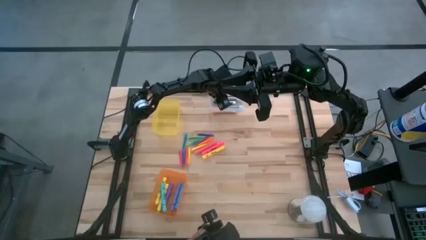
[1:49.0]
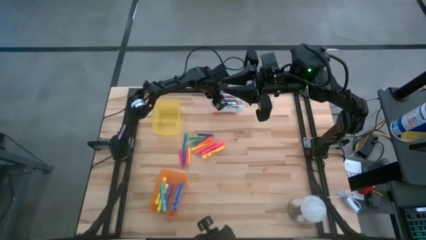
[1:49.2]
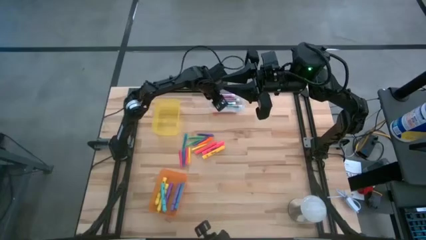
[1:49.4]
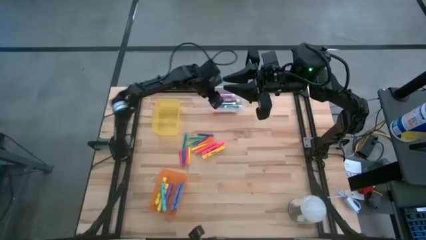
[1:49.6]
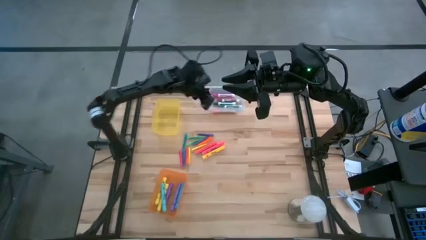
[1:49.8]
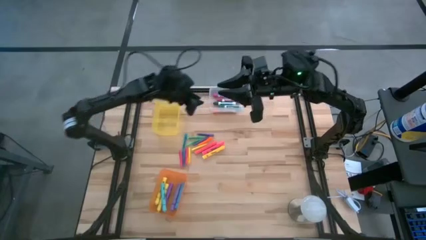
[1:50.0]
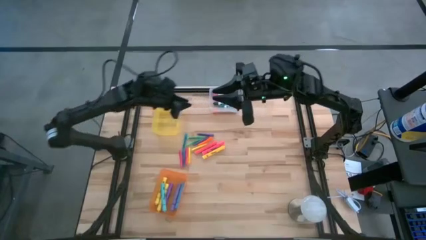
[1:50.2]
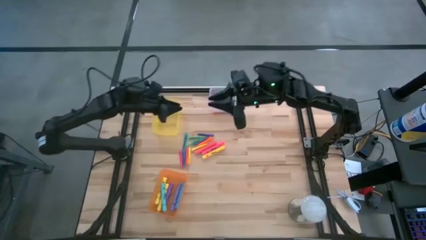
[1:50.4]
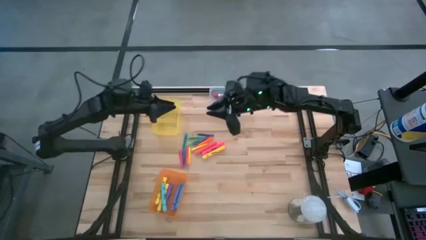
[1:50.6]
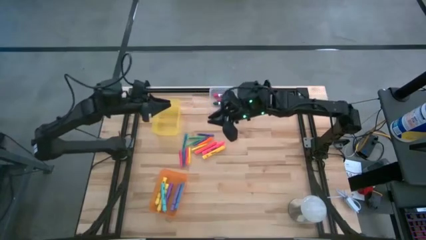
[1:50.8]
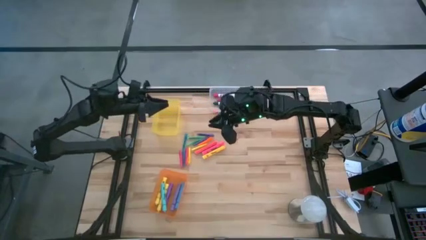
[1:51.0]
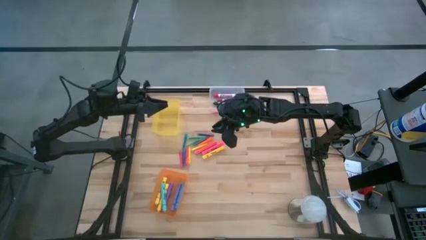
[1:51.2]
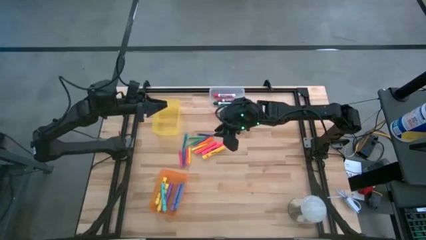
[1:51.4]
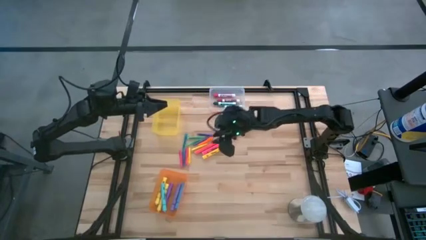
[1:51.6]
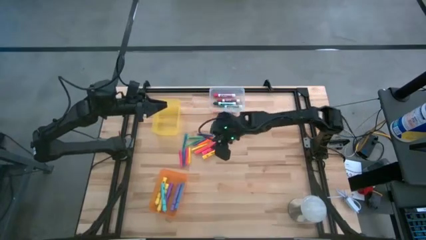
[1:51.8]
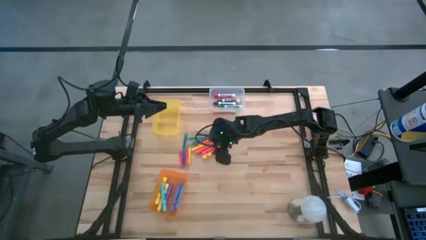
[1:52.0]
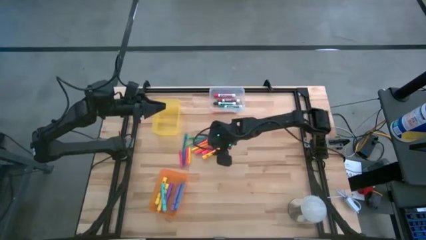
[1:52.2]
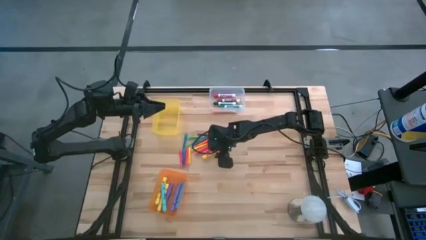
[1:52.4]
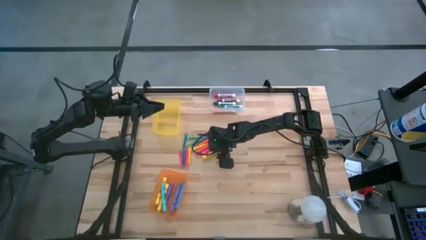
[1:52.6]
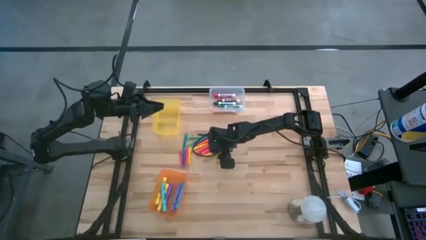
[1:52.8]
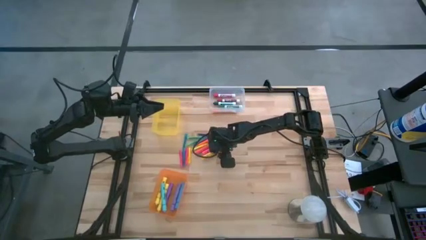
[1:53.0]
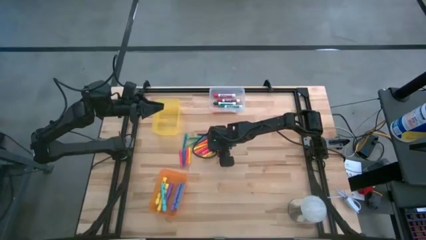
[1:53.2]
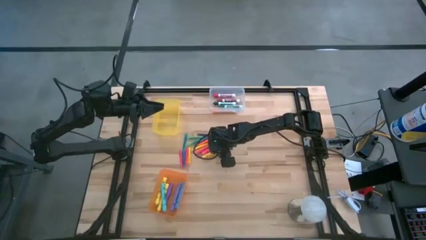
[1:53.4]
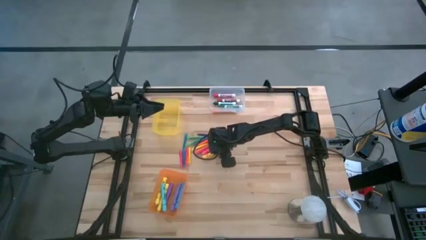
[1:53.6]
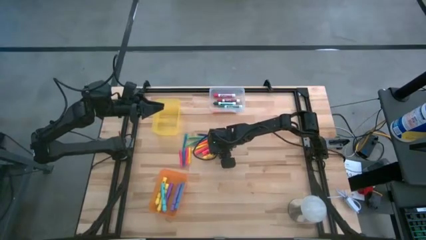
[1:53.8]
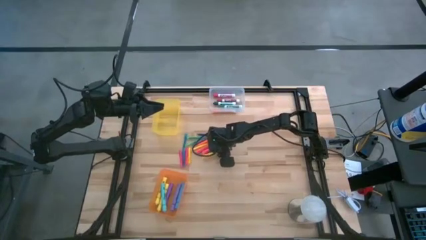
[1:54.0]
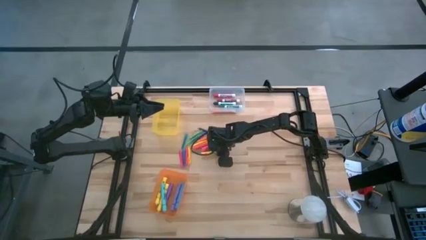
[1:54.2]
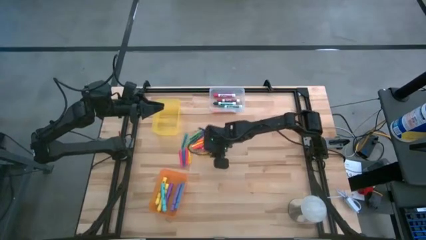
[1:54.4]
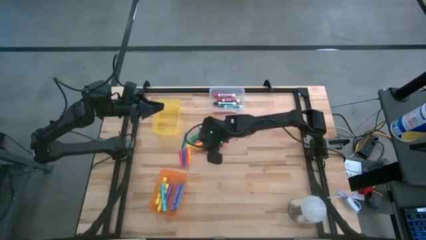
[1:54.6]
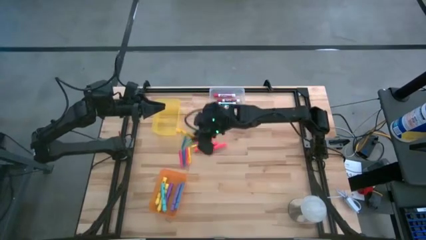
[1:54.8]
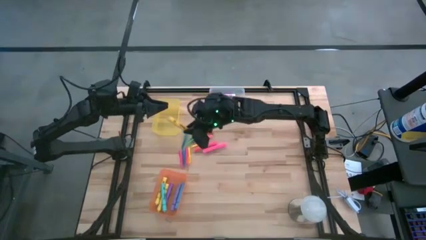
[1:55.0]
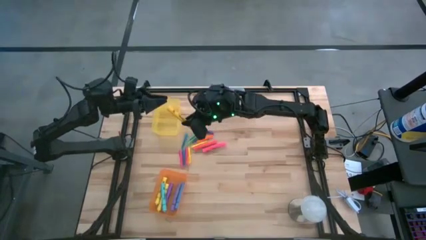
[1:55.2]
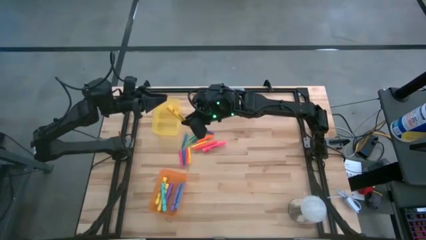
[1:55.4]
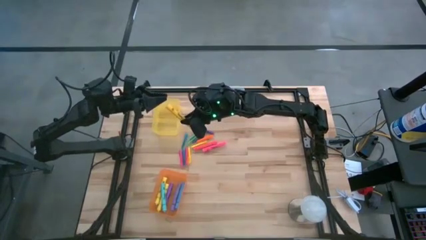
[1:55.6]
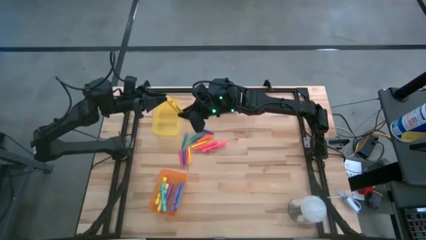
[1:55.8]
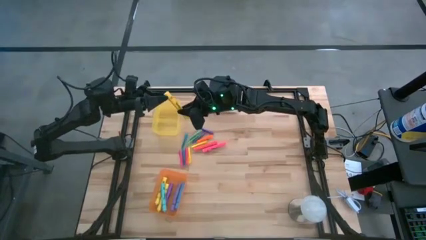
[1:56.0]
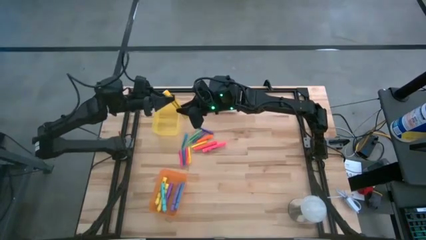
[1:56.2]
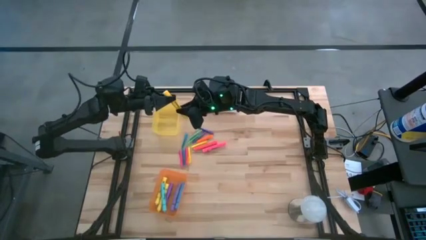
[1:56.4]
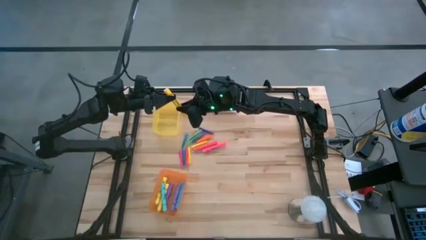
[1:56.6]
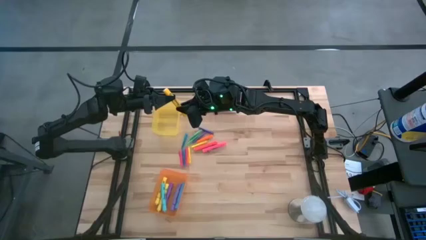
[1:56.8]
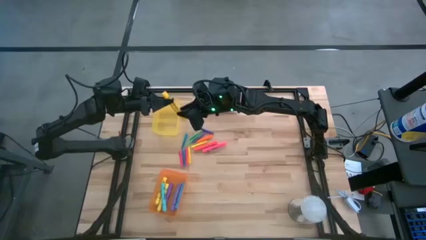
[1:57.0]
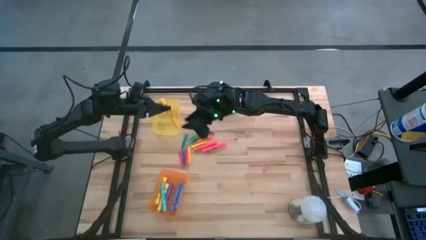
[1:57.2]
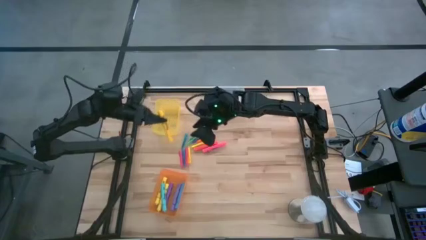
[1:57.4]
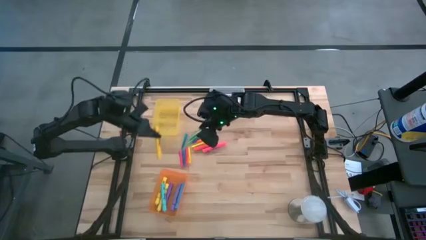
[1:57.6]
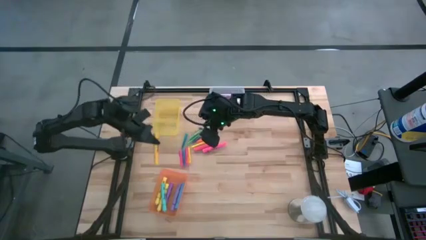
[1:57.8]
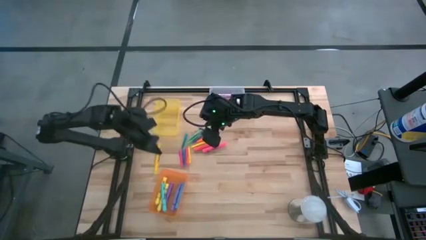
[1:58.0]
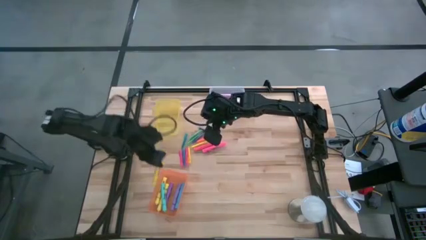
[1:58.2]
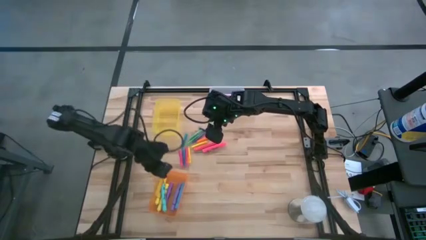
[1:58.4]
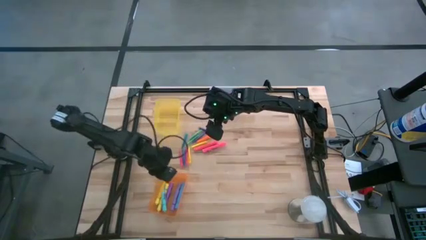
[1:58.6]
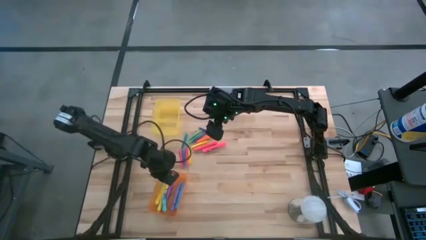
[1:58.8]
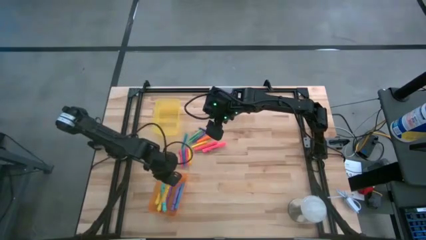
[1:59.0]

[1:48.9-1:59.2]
Task: Pick & Place Markers
Put the dark yellow highlighter into the orange bin

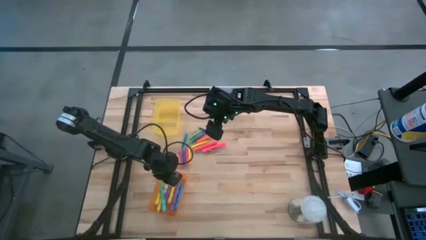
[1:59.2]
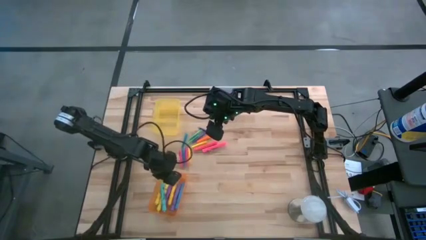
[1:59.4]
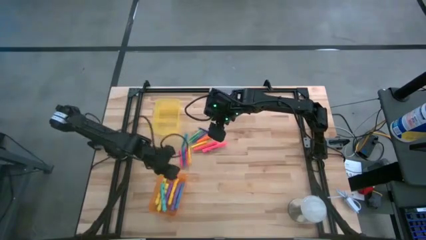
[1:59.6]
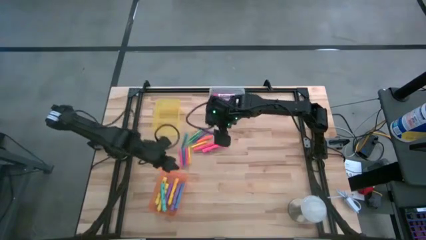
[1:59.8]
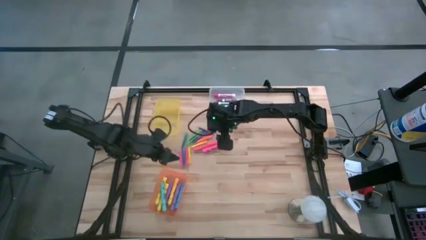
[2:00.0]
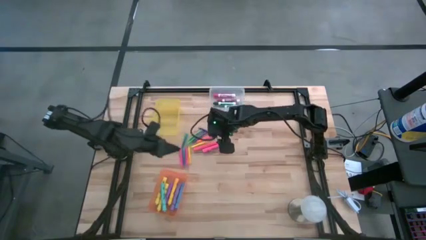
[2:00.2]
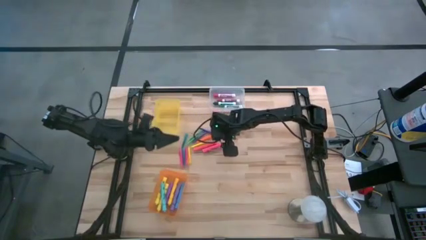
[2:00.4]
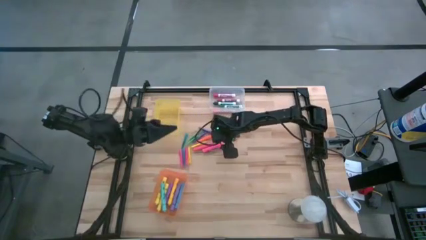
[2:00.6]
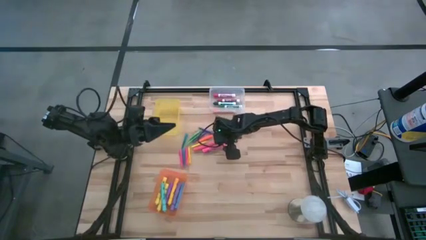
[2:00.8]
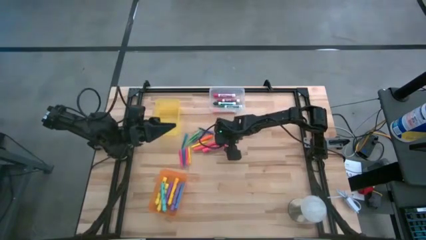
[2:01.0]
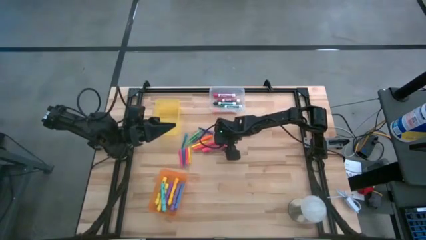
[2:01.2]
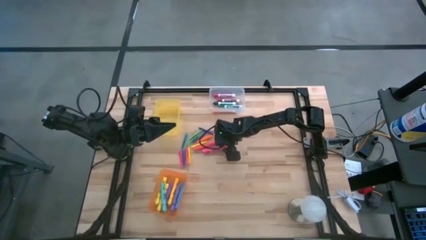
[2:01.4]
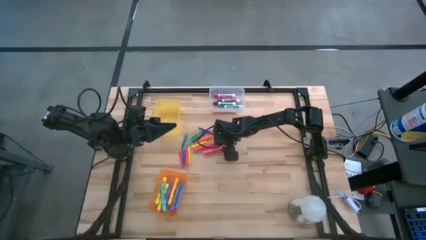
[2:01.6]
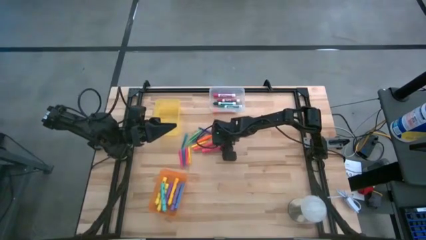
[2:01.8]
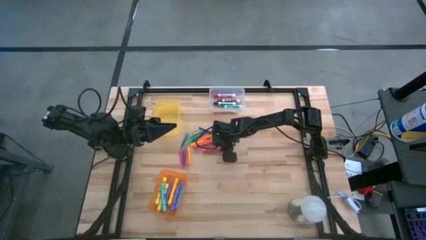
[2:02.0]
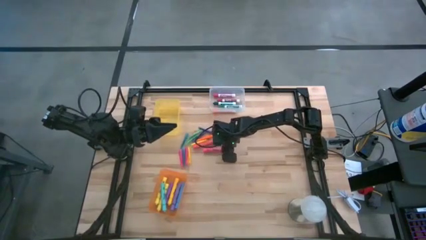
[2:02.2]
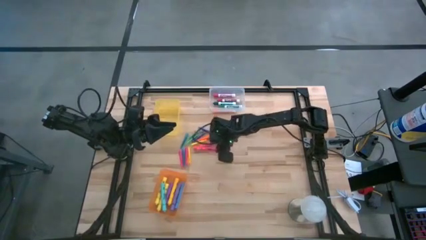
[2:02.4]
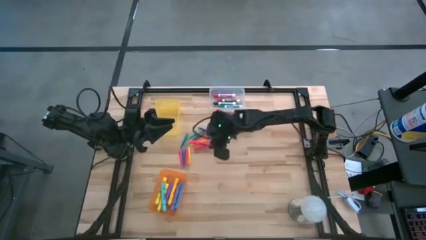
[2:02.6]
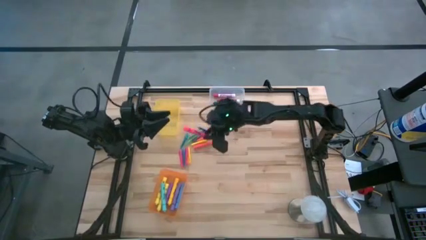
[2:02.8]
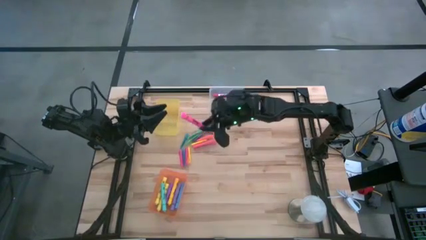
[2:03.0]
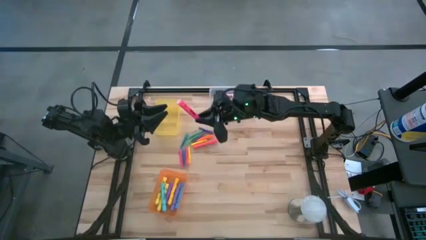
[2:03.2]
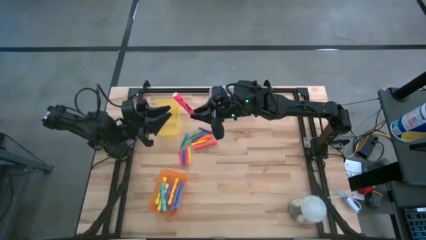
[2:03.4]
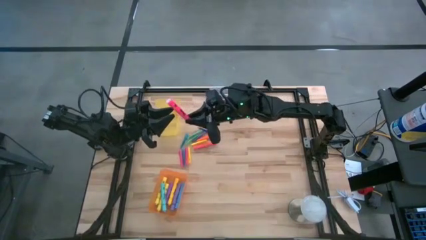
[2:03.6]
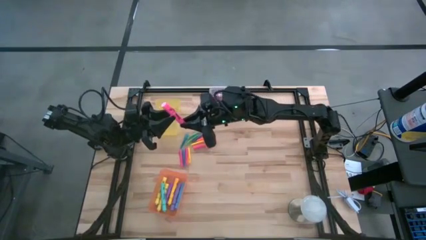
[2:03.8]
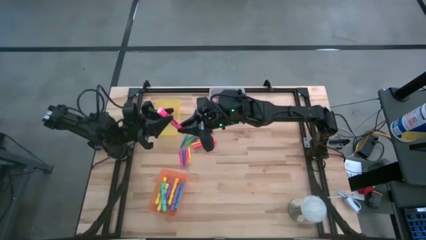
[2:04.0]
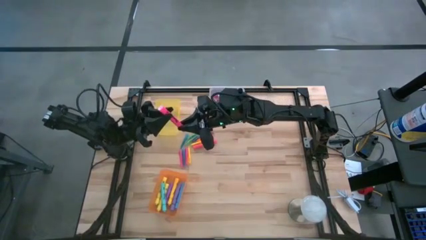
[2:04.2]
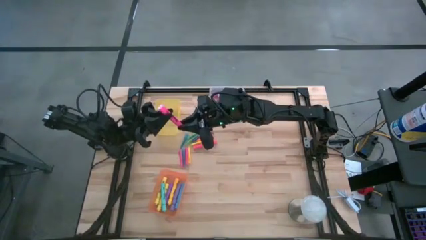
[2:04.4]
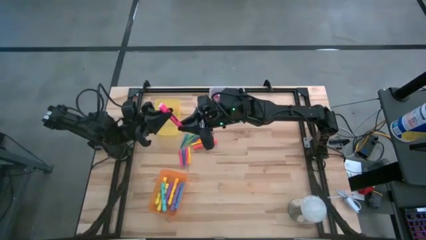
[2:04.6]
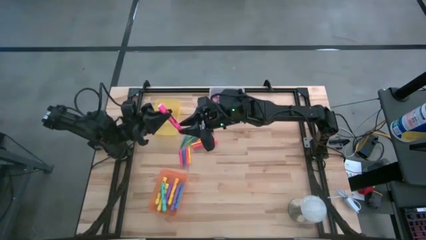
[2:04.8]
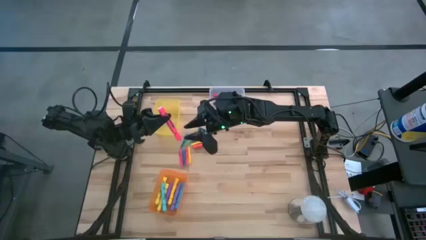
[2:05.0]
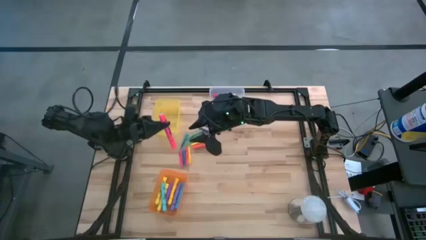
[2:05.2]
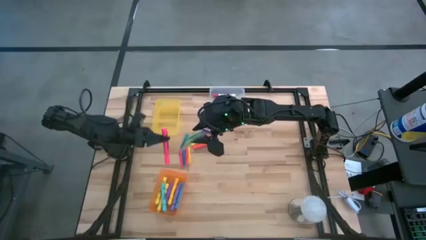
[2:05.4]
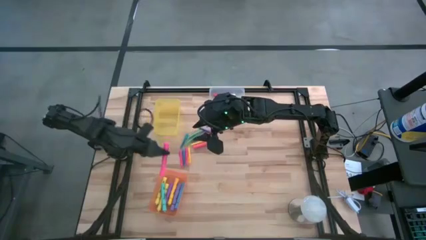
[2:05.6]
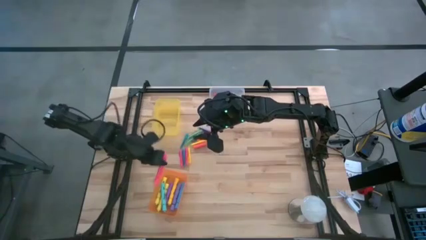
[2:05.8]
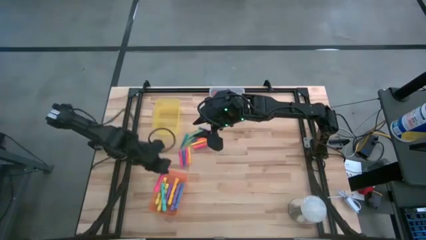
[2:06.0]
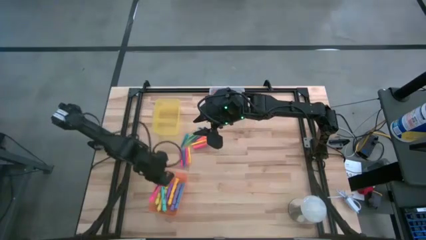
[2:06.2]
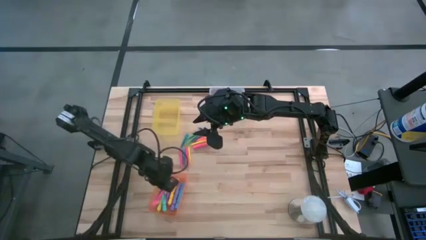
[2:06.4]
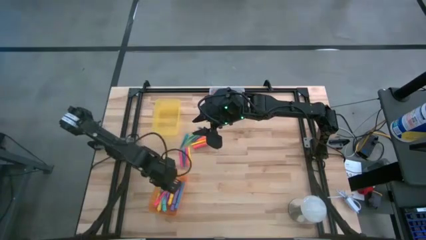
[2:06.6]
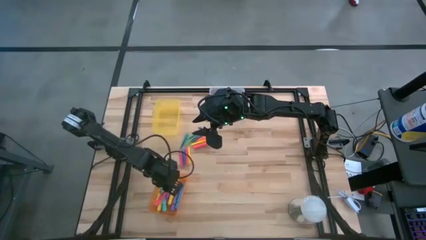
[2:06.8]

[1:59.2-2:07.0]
Put the pink highlighter into the orange bin
